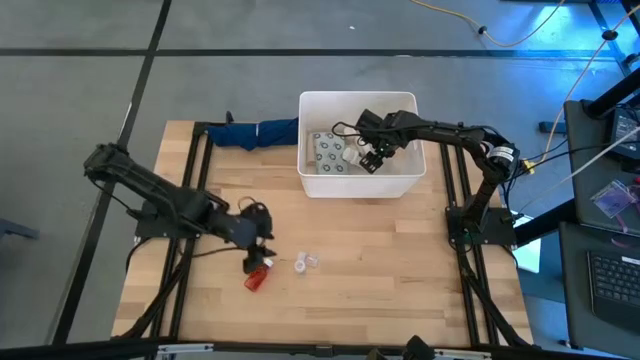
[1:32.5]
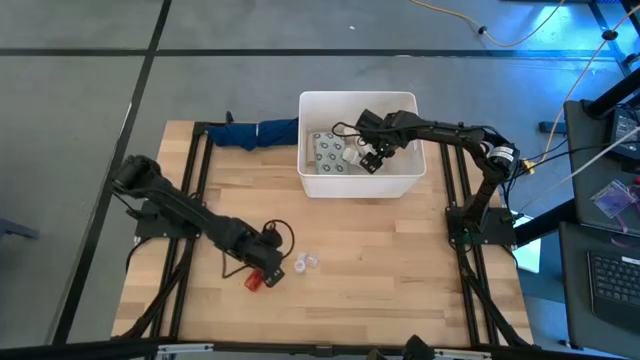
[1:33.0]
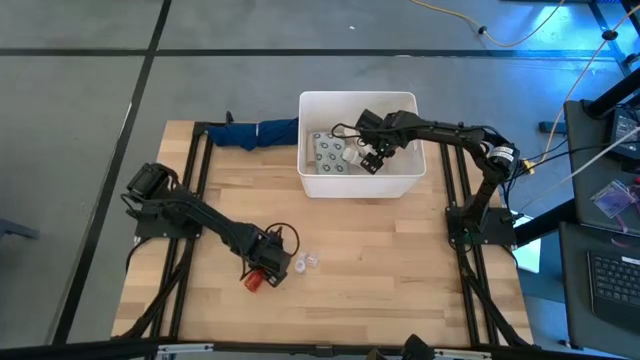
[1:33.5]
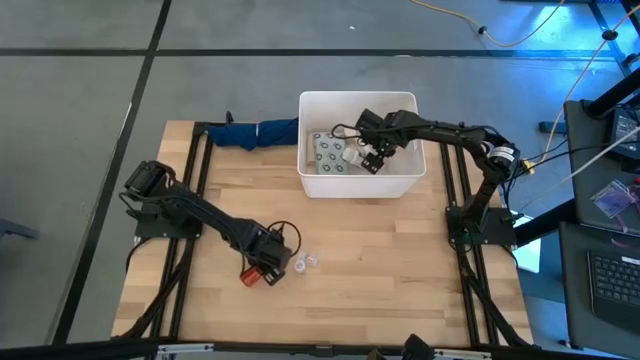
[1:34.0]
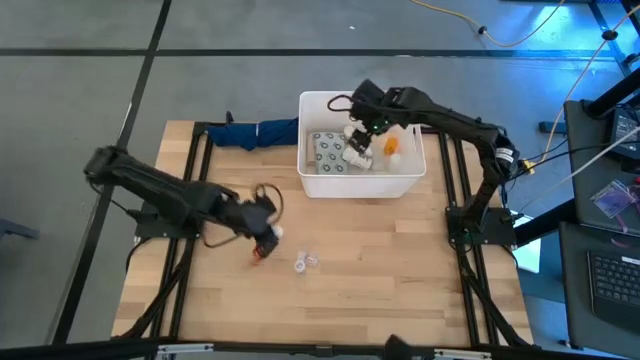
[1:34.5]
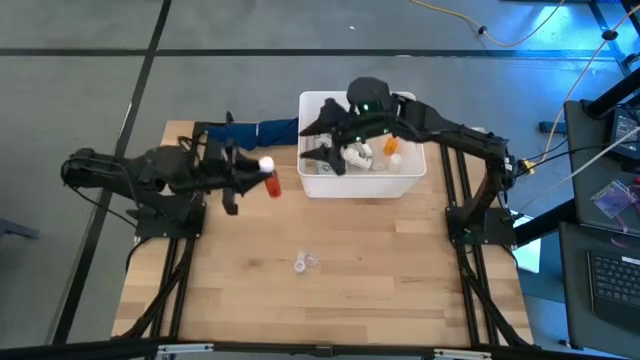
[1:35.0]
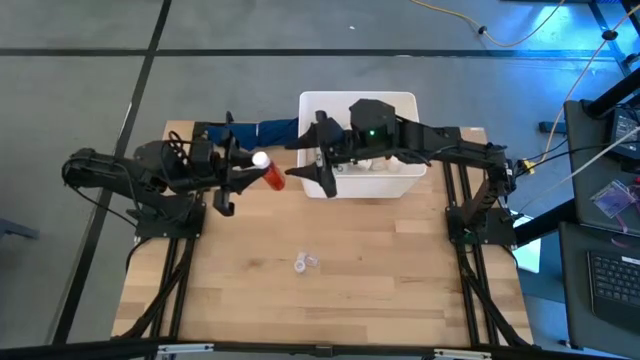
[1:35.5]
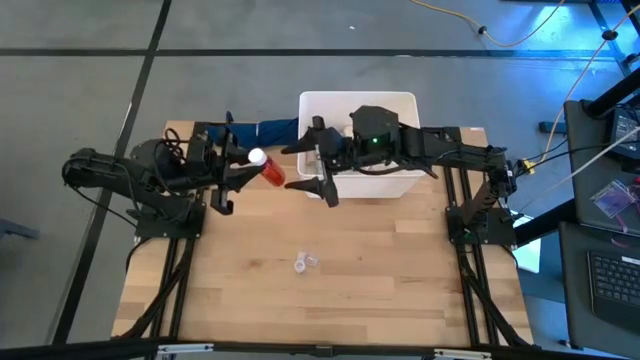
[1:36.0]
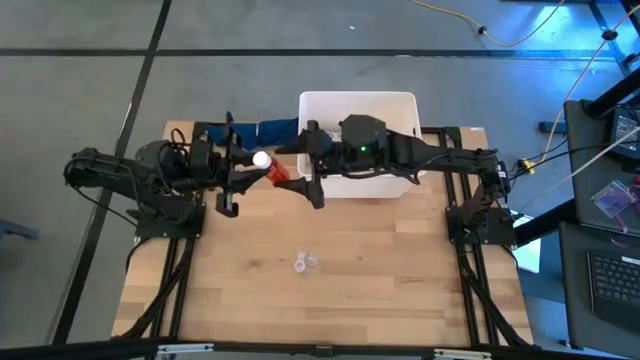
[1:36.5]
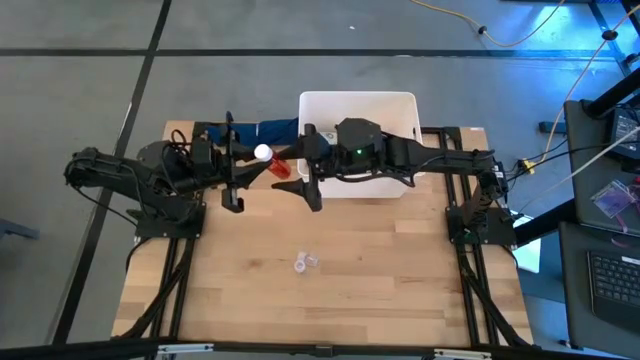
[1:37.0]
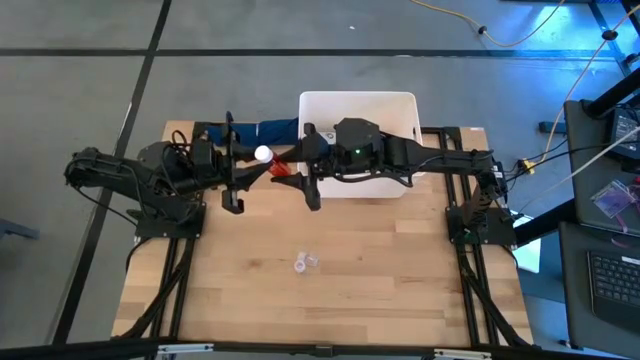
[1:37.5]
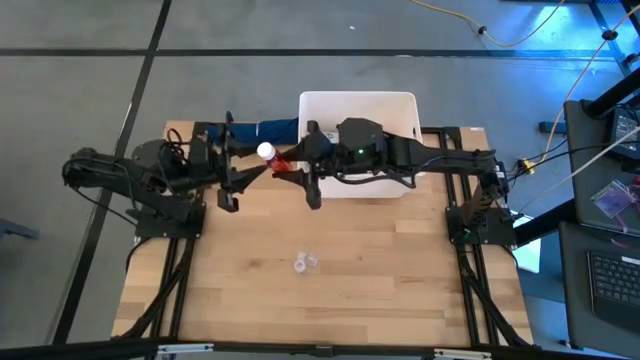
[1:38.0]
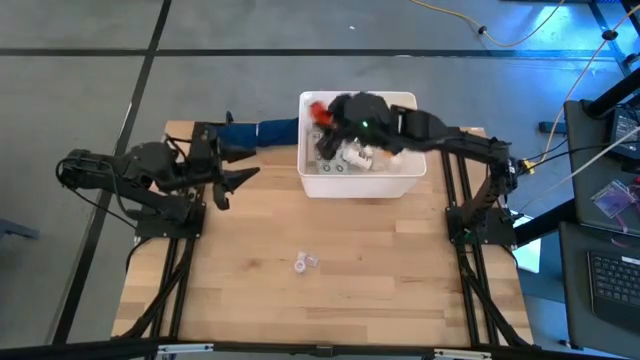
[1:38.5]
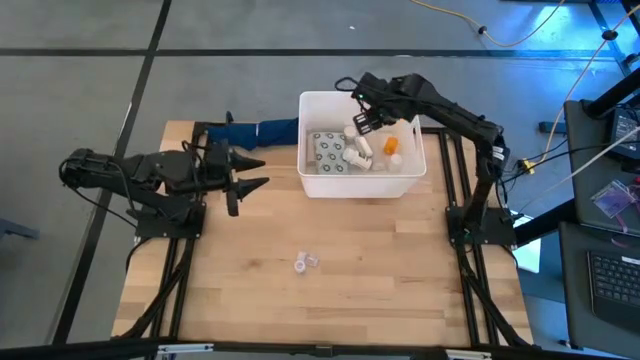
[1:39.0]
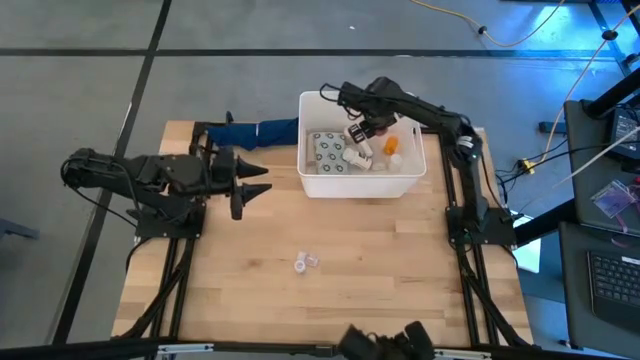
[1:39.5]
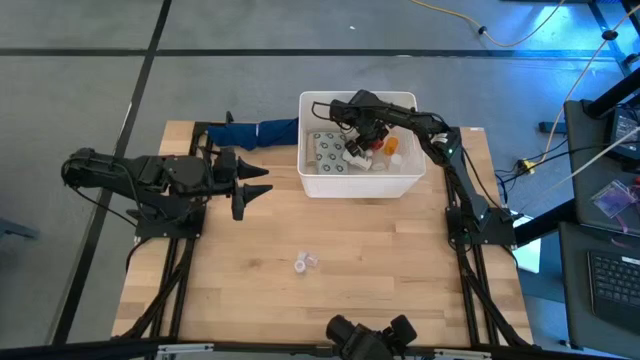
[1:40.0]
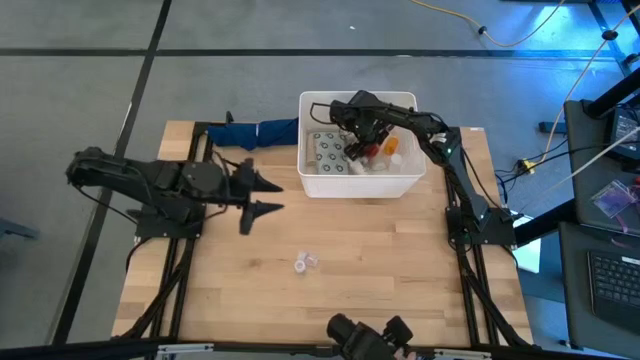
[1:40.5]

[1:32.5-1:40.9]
Task: Pick & place medical supplies in basket/bin
Put the red pill bottle into the white bin

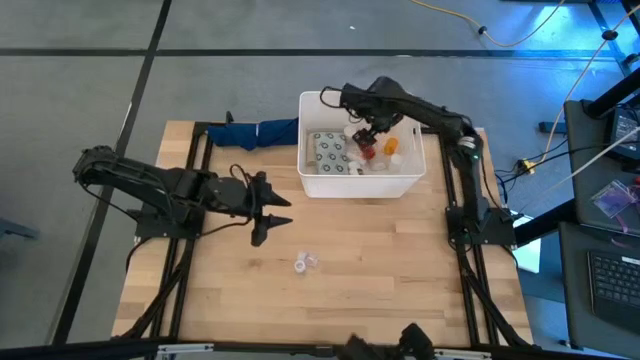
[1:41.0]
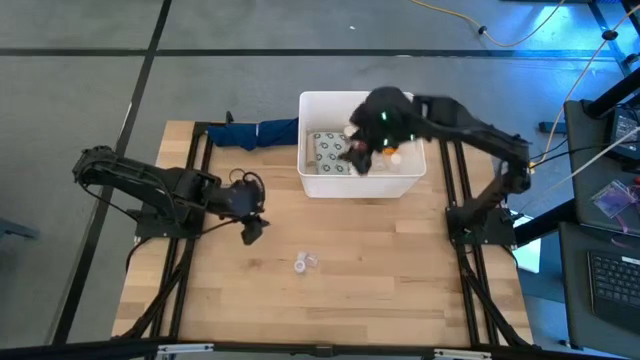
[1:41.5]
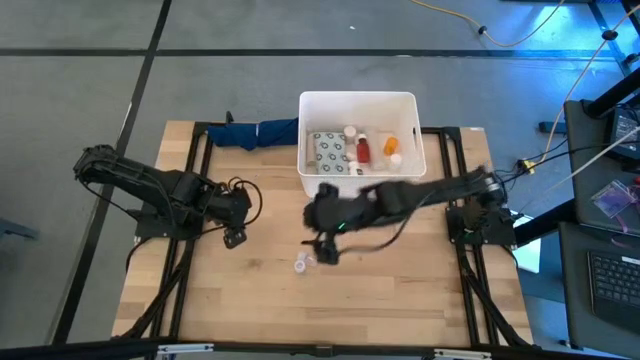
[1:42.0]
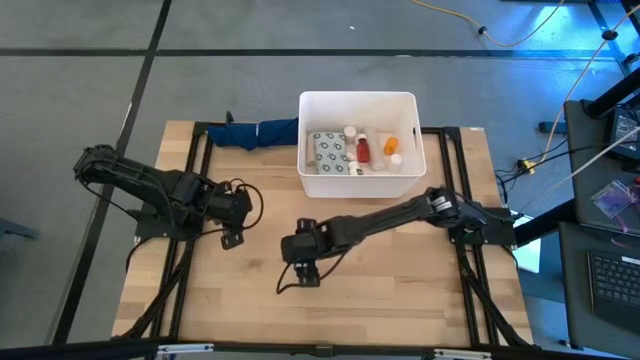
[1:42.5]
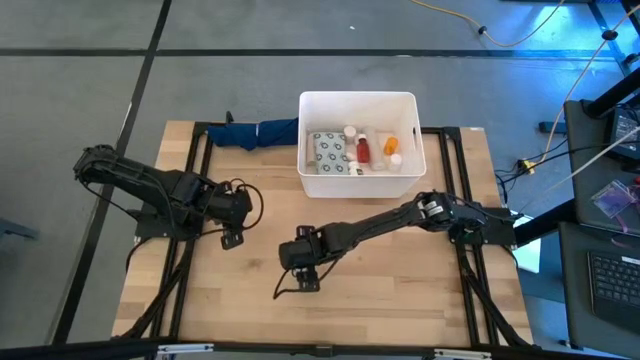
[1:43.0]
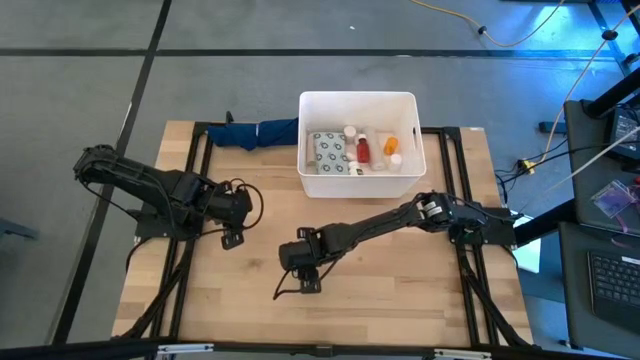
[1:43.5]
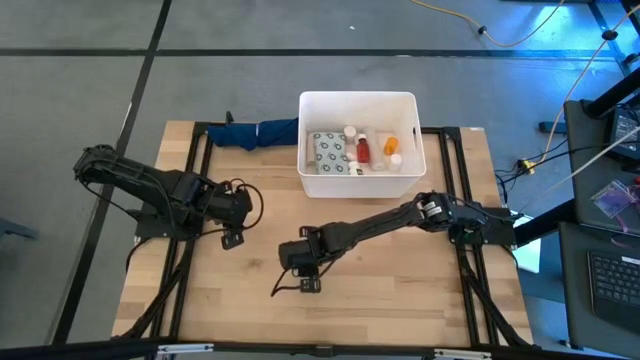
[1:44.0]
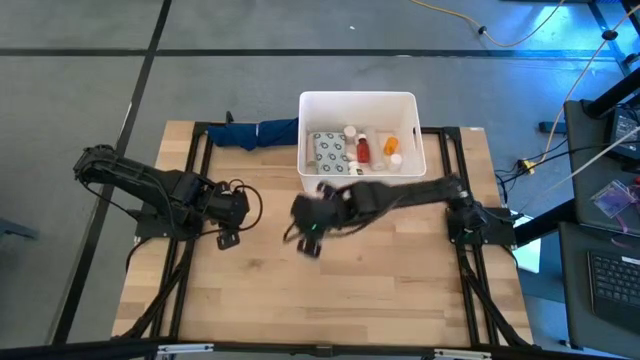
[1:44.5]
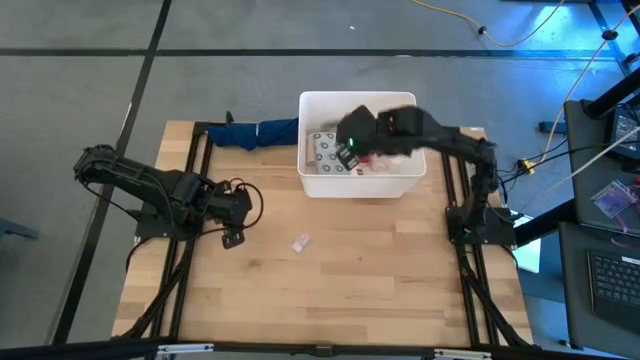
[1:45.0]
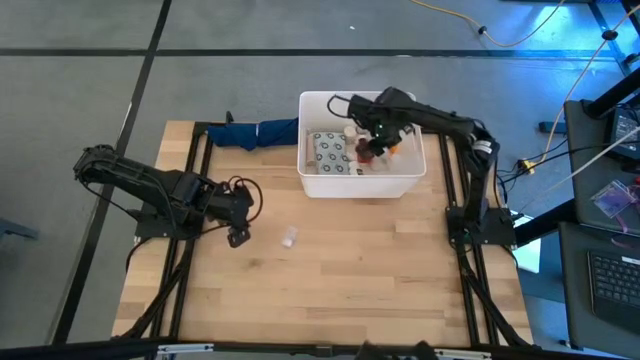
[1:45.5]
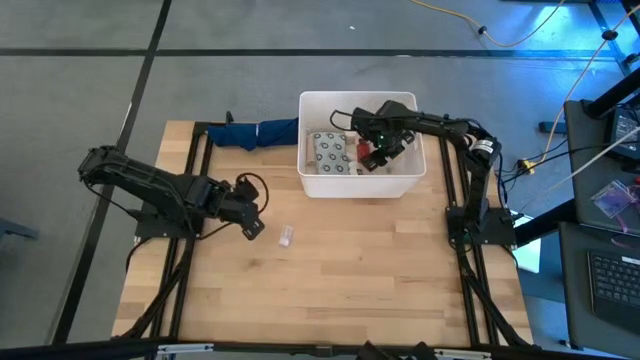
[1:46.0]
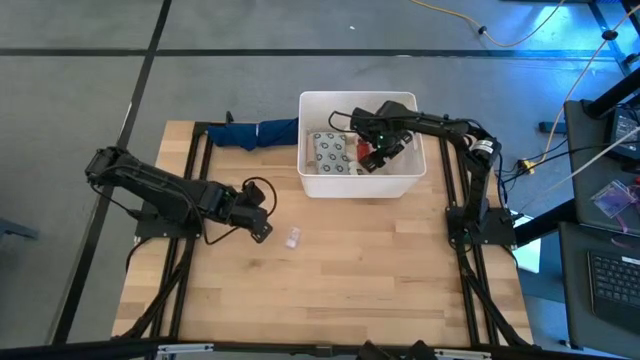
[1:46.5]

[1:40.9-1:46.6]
Put the left transparent pill bottle into the white bin

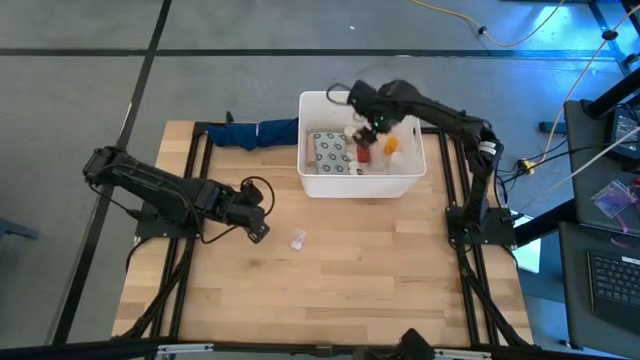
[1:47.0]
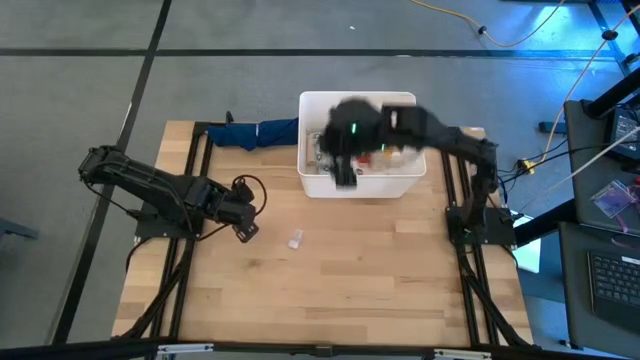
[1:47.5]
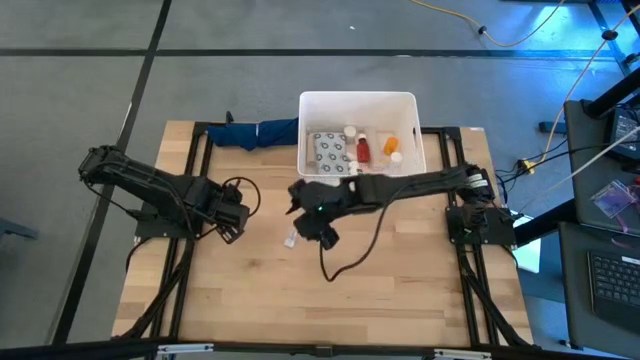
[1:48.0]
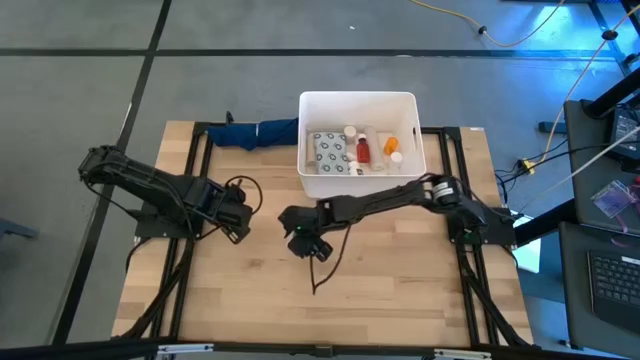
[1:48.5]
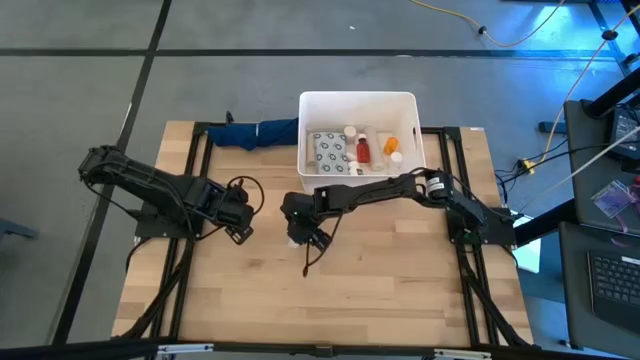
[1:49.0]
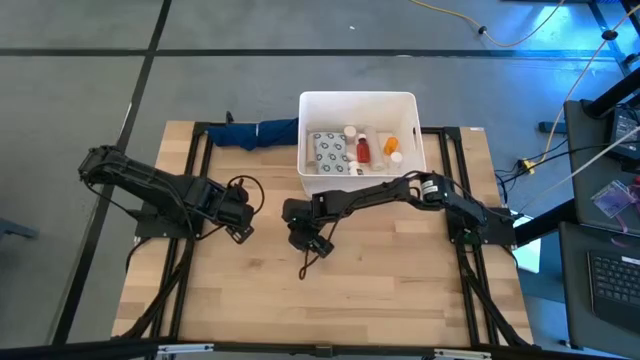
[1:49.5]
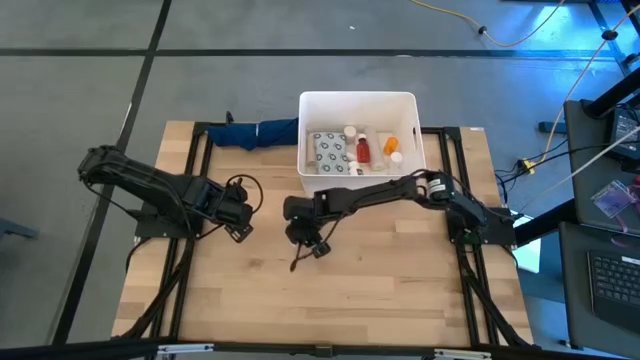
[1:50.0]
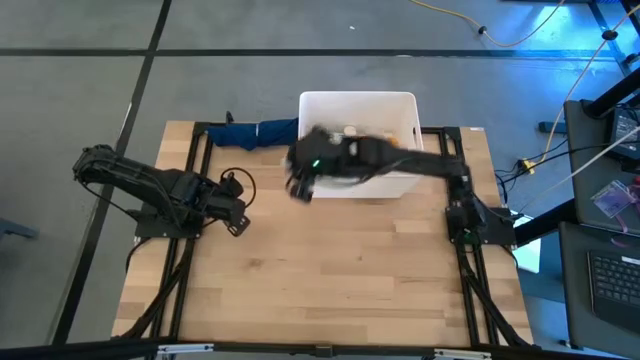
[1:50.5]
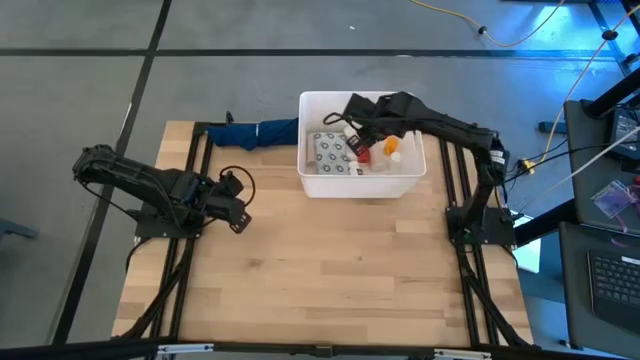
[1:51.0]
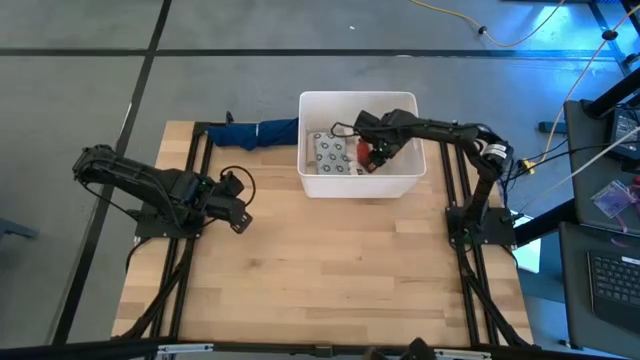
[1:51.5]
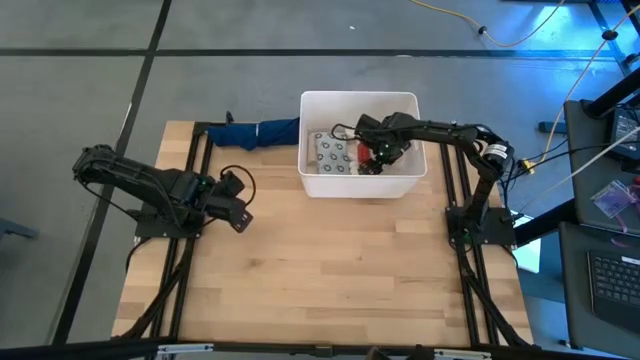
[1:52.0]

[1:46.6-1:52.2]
Put the transparent pill bottle into the white bin
